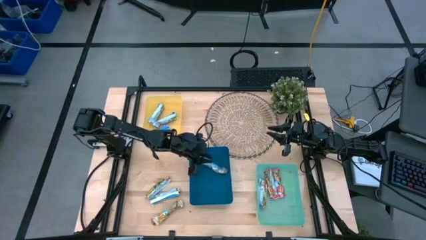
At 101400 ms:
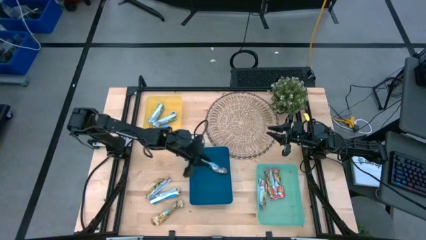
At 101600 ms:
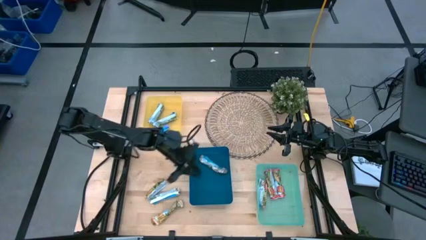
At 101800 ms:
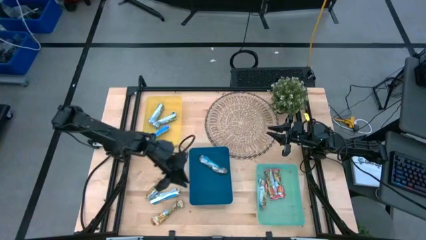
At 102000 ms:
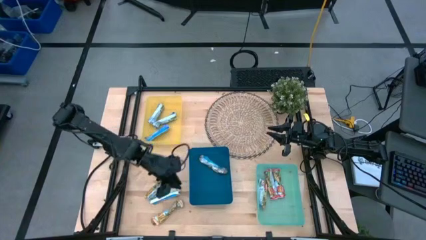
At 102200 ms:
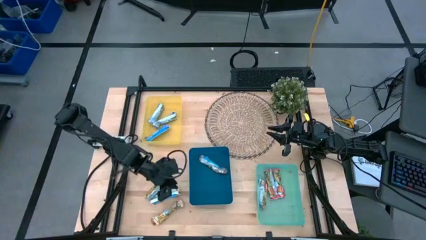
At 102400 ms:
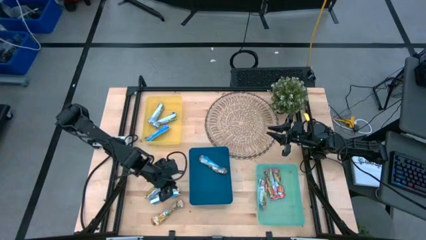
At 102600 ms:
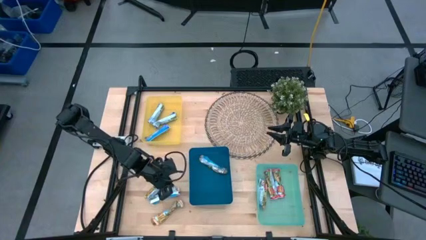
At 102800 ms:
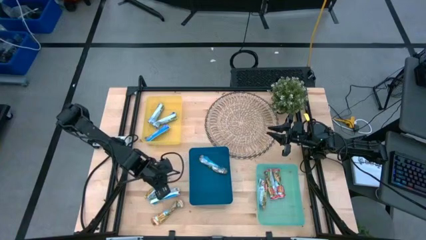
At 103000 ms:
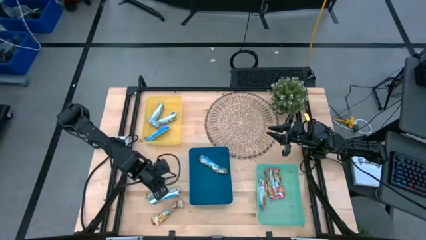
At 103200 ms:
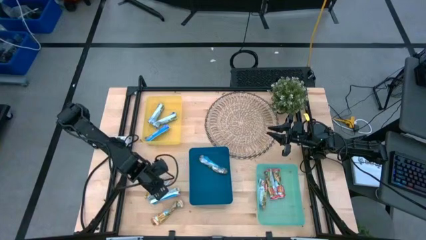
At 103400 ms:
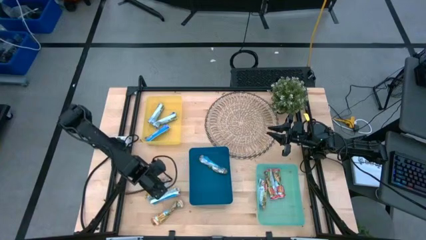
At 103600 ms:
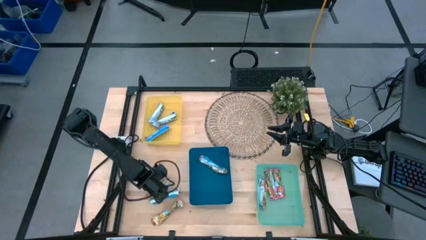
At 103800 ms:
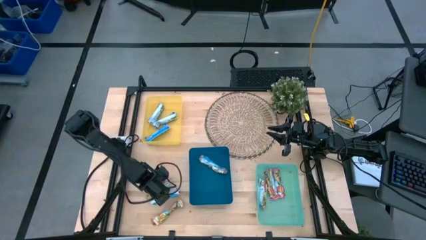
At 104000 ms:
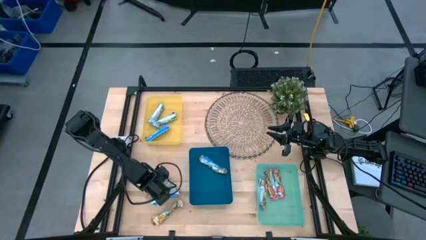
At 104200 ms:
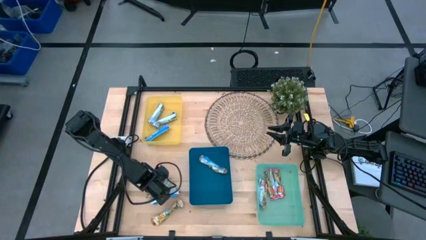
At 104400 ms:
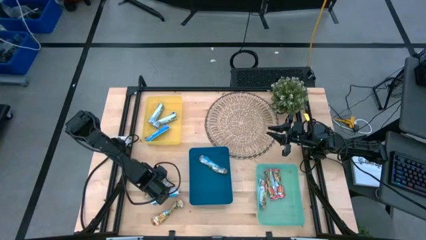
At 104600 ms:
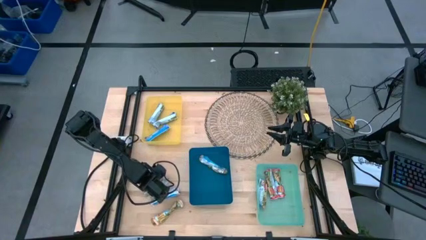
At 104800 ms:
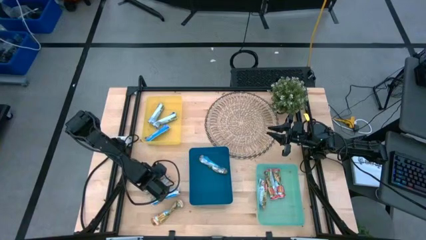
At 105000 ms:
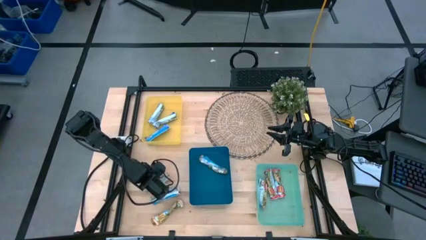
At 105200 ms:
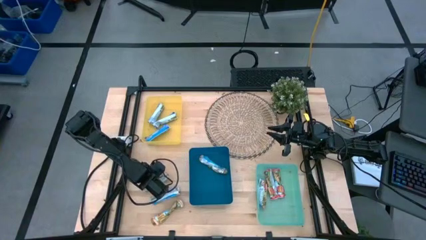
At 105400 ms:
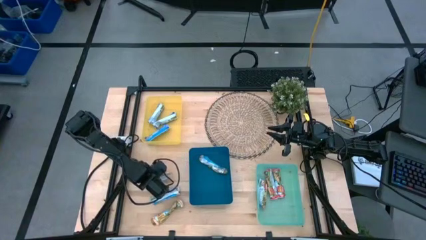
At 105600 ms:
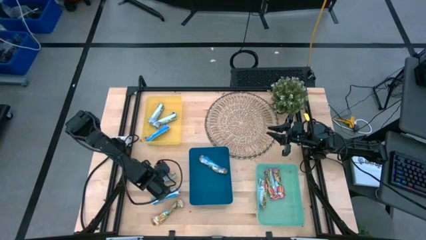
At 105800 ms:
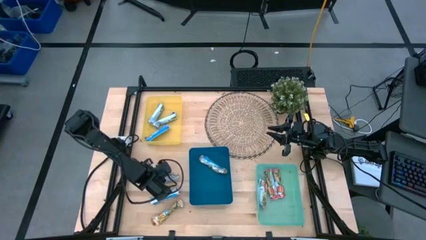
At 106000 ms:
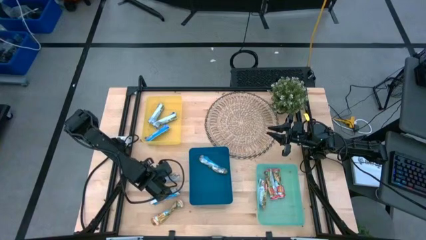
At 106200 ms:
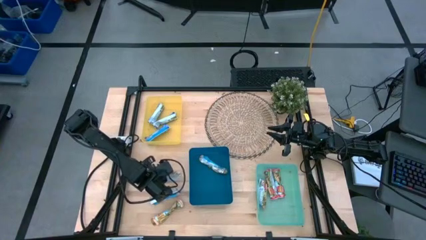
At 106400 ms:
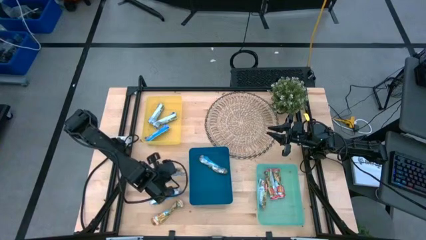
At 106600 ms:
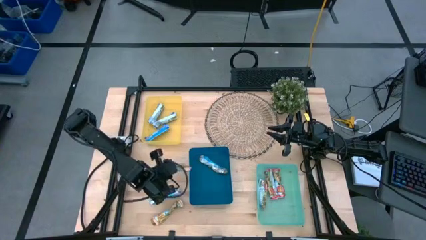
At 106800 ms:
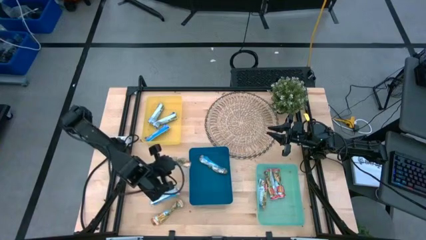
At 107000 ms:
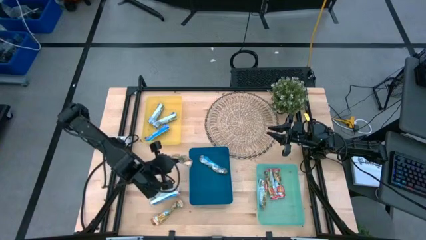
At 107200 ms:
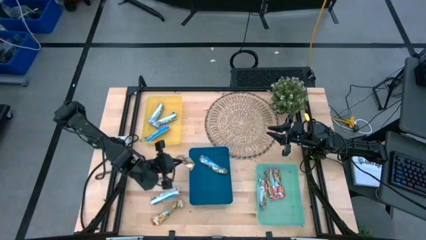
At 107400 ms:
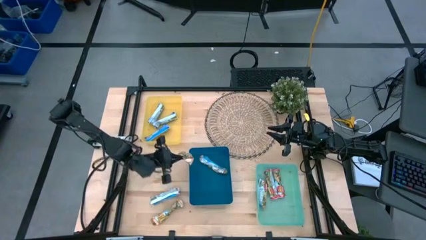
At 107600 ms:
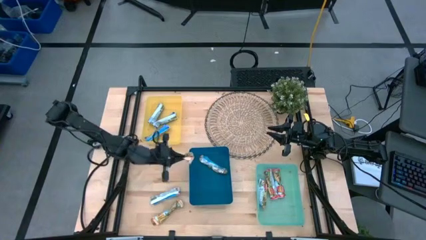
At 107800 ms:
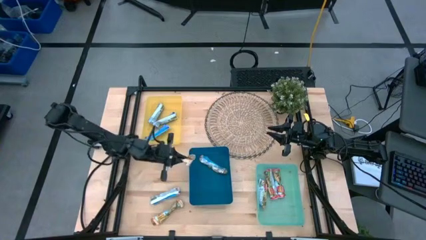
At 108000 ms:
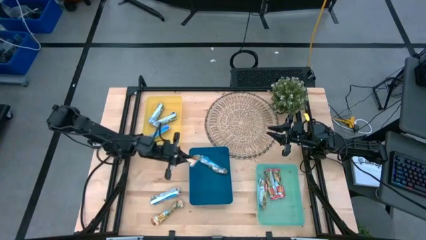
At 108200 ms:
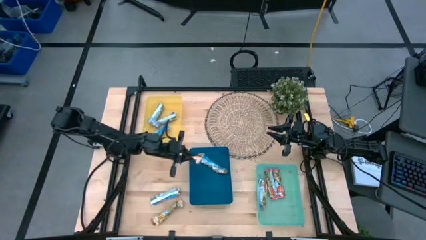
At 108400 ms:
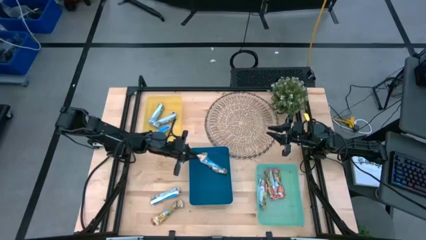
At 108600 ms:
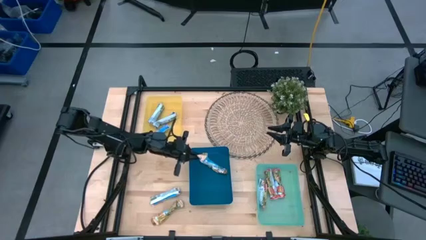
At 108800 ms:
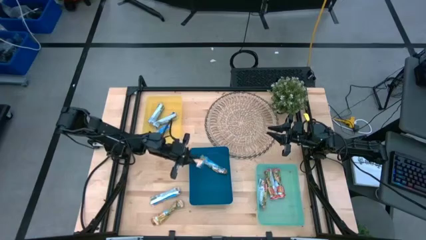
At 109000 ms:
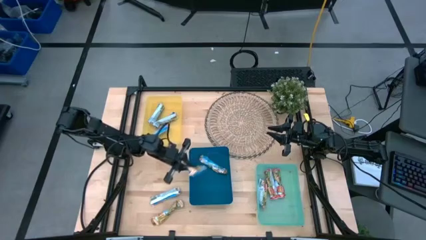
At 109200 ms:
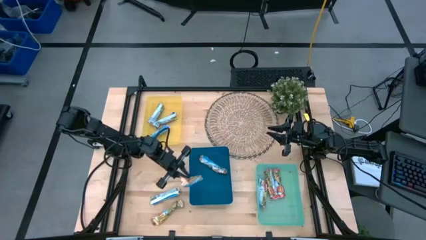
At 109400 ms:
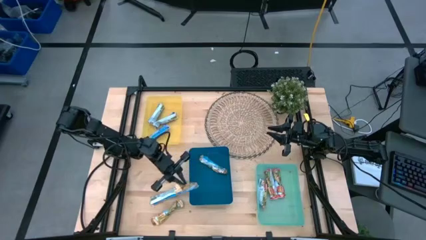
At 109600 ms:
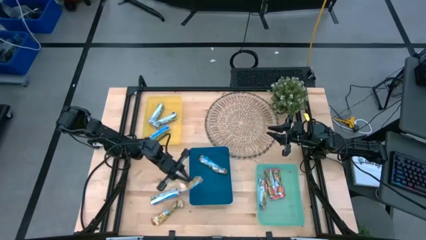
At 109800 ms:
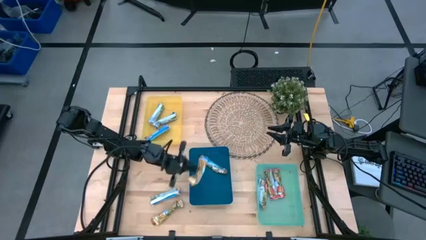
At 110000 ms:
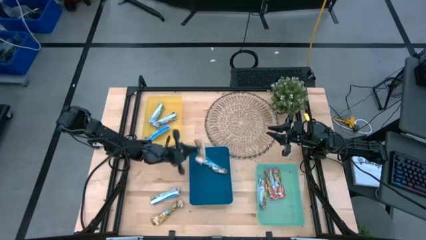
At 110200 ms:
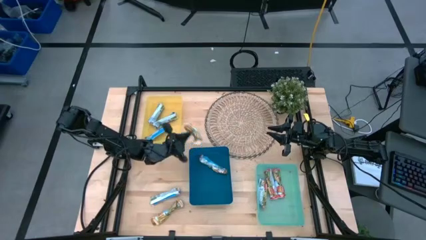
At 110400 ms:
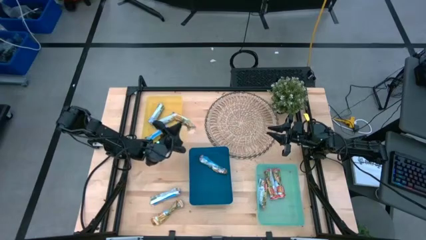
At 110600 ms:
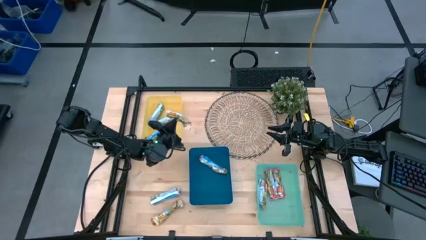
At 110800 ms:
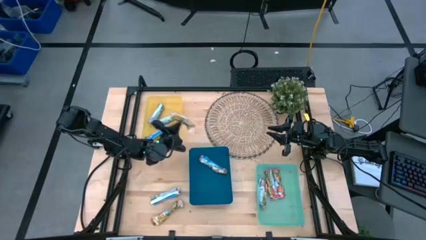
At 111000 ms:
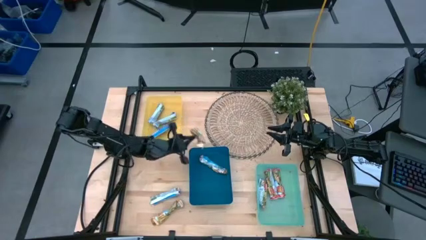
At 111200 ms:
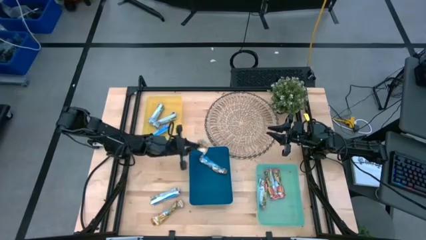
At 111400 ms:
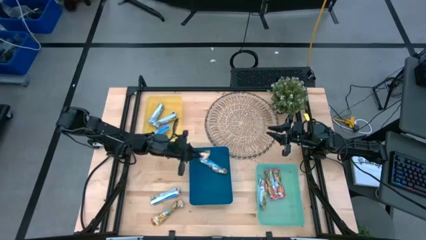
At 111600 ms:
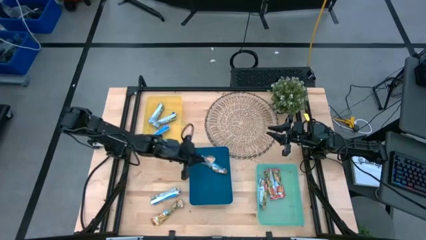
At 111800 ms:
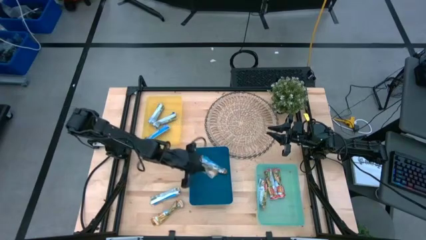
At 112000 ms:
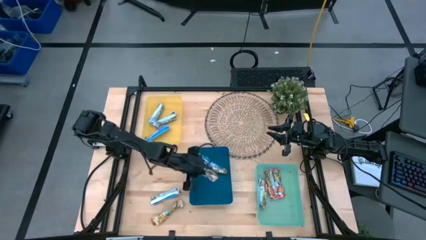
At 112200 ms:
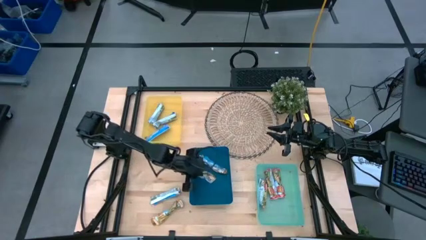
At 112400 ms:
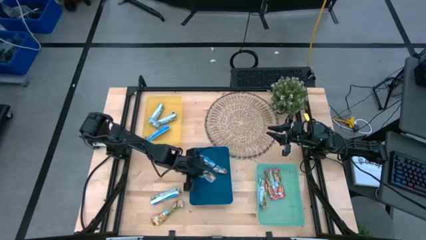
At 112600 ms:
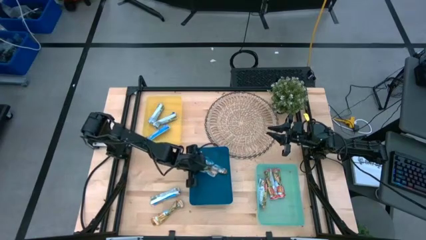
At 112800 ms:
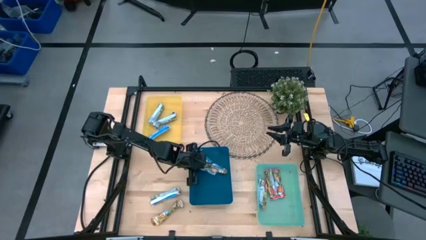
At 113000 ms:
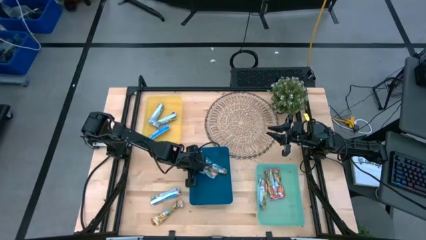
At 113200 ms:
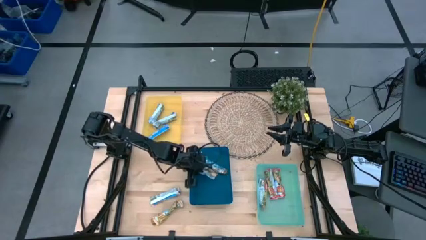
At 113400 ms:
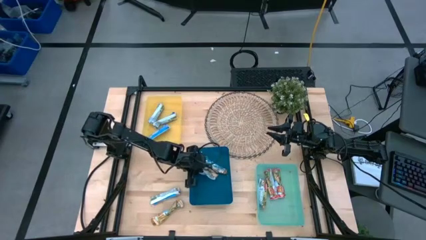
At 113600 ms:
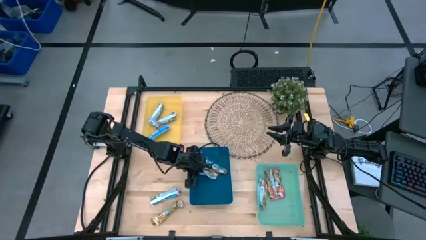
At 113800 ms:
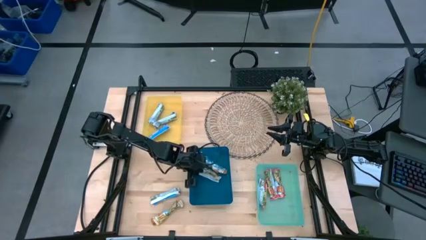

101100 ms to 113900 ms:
Task: Pick and place Granola Bars by type
Put the yellow granola bar into the blue bin

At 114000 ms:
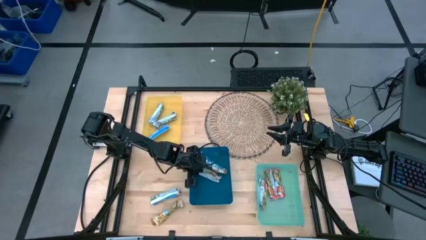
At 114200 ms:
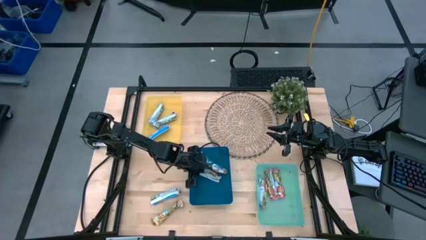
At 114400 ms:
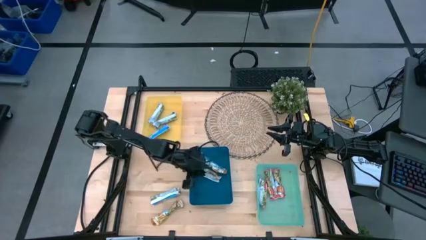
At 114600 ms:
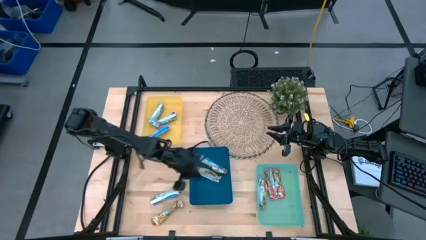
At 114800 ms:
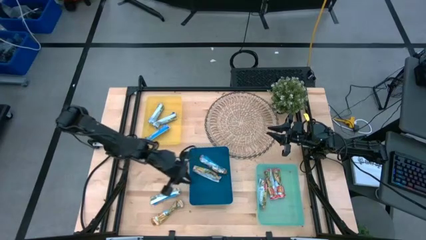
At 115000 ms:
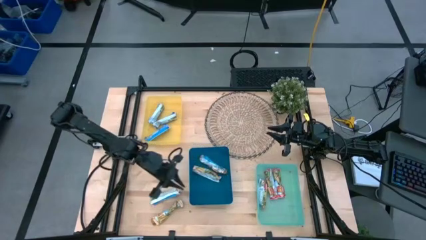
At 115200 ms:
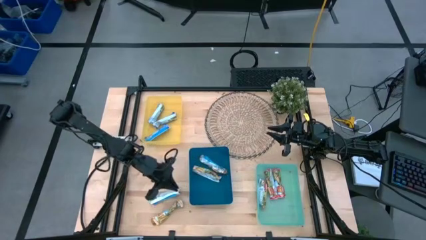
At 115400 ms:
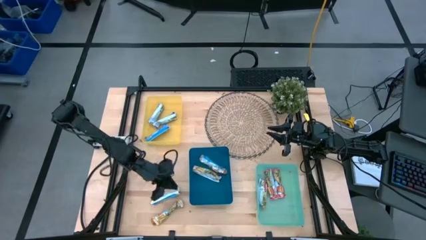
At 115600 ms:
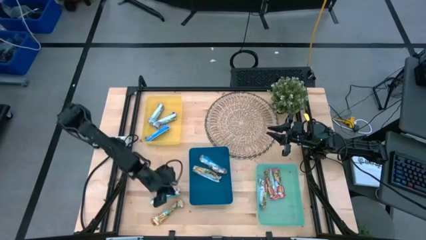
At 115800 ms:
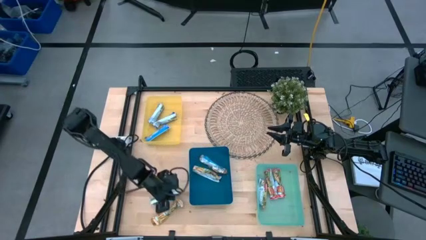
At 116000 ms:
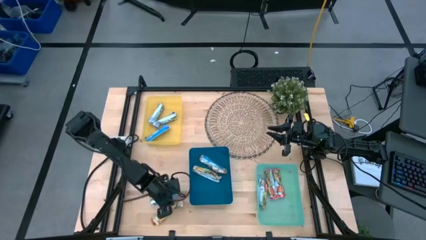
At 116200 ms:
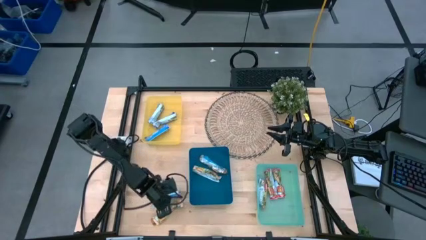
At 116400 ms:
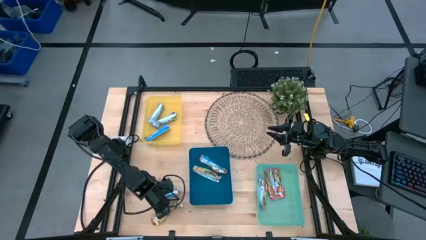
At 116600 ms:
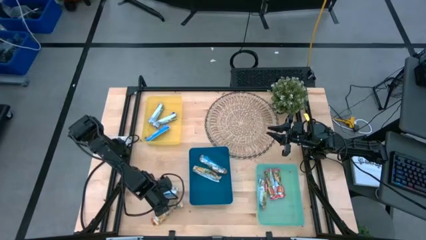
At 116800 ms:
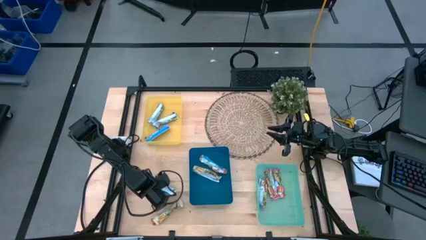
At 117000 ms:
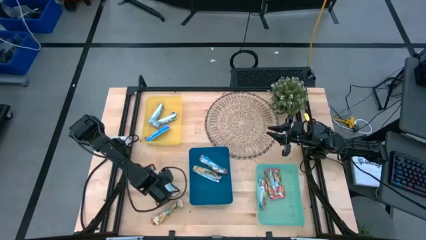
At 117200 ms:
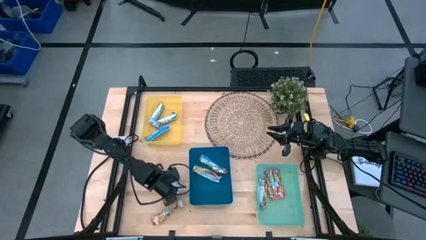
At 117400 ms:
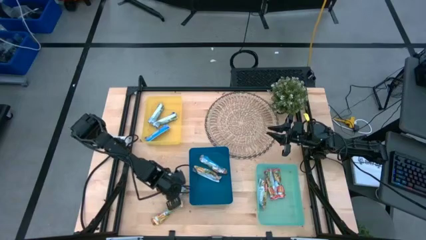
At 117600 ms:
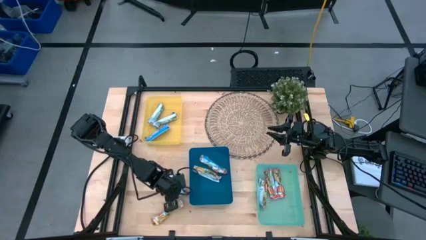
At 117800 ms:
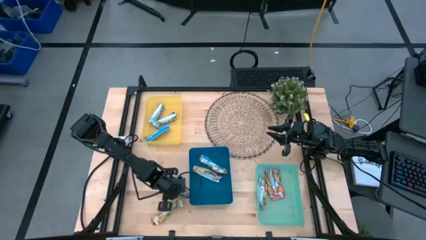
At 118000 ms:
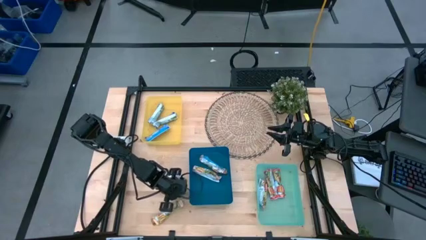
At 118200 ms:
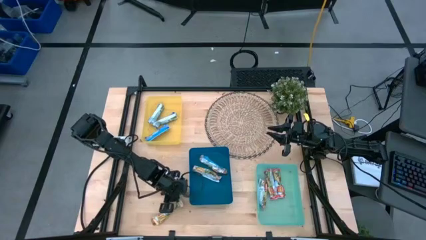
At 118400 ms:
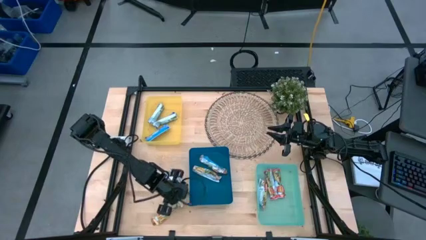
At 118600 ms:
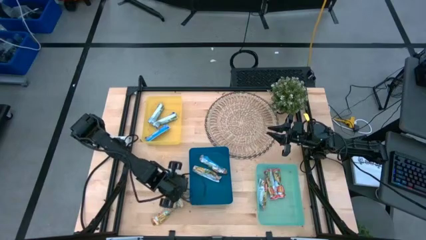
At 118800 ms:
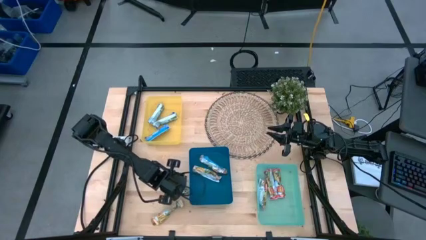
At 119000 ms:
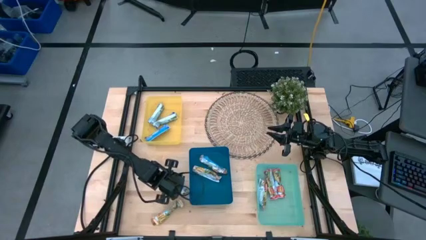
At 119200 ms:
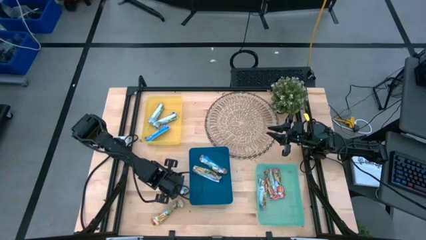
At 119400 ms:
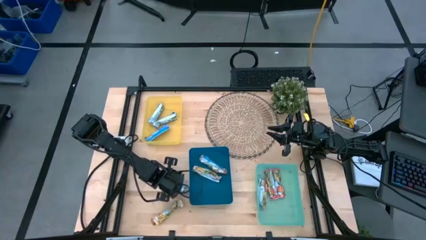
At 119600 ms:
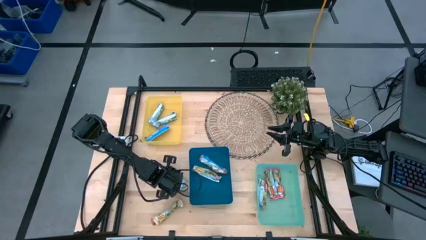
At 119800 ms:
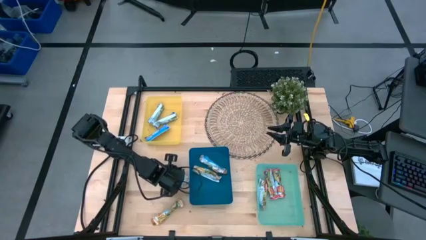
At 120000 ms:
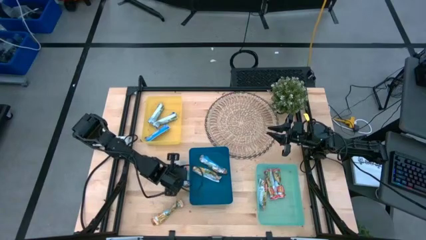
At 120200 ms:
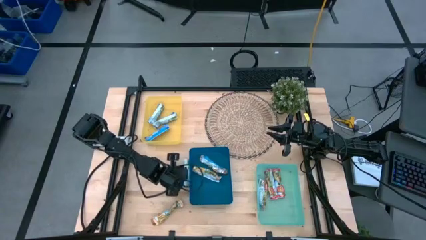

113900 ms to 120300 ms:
Put the yellow granola bar into the blue bin
